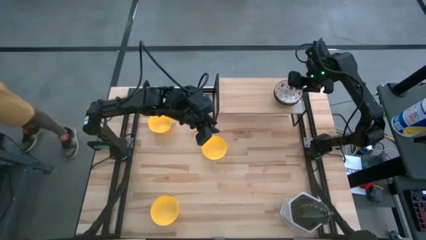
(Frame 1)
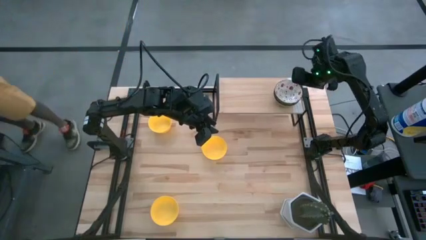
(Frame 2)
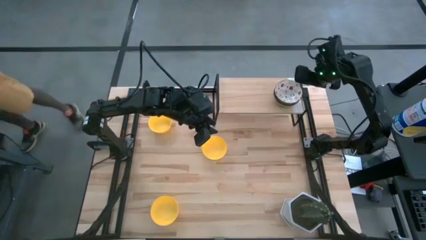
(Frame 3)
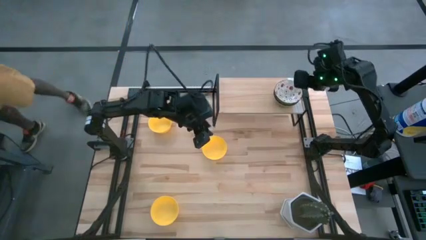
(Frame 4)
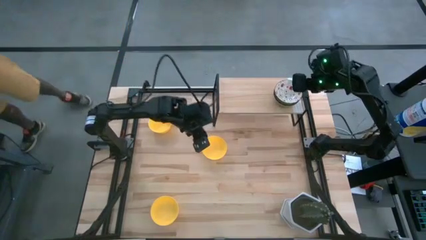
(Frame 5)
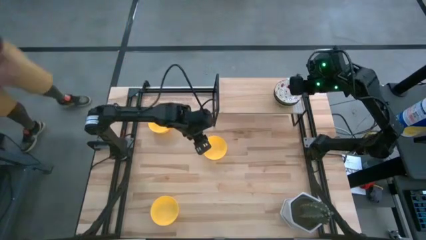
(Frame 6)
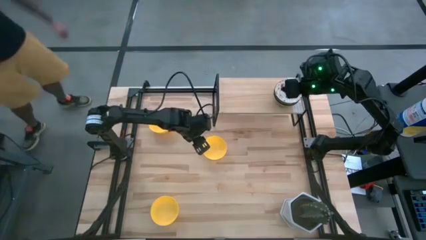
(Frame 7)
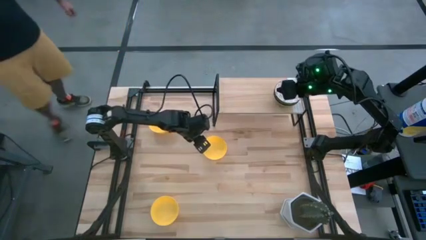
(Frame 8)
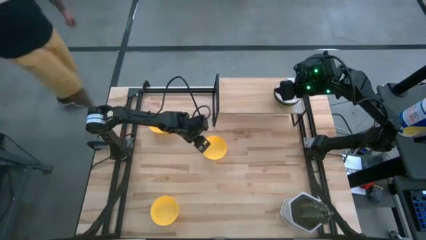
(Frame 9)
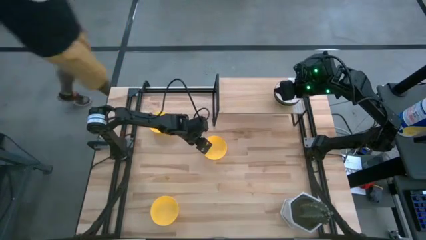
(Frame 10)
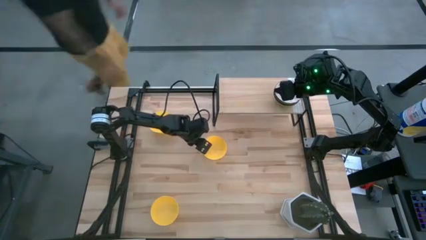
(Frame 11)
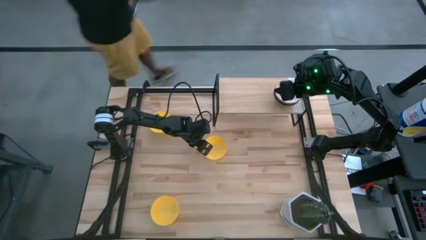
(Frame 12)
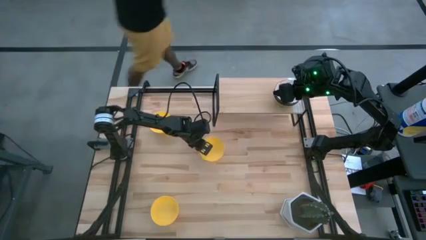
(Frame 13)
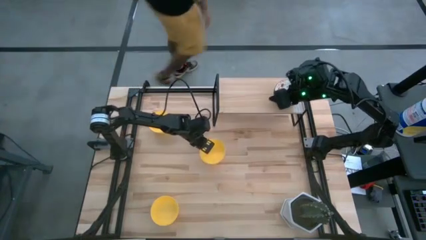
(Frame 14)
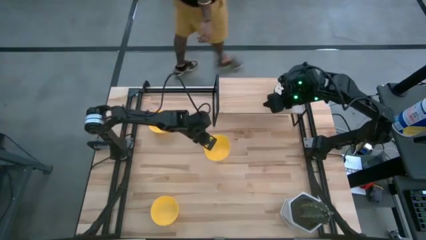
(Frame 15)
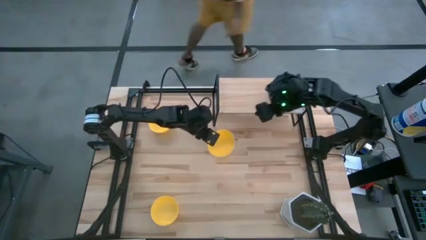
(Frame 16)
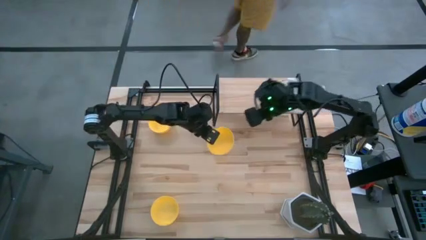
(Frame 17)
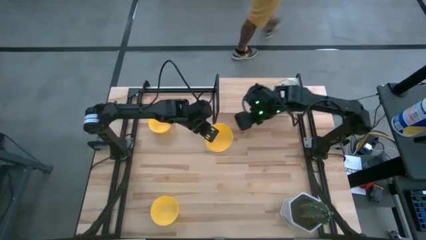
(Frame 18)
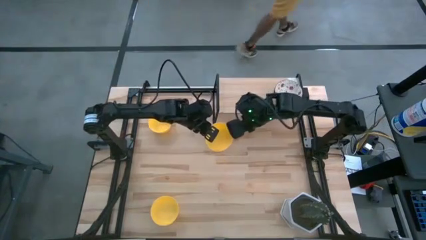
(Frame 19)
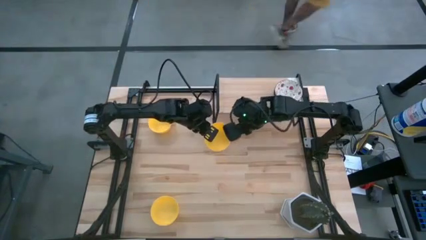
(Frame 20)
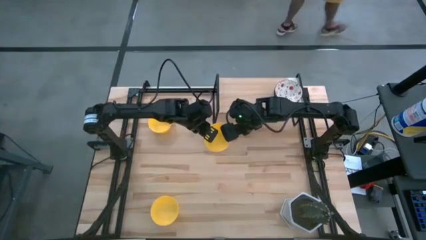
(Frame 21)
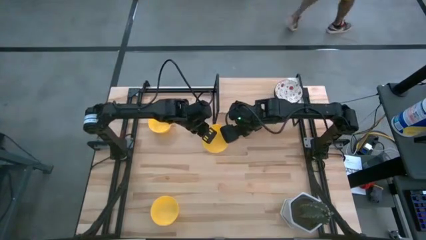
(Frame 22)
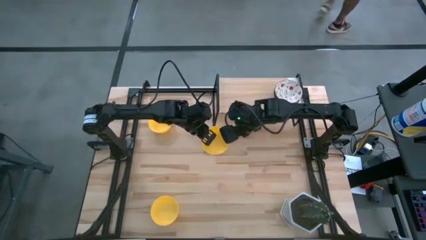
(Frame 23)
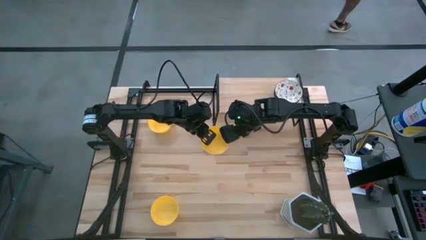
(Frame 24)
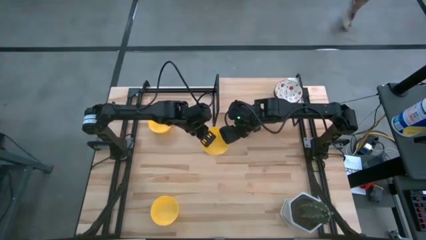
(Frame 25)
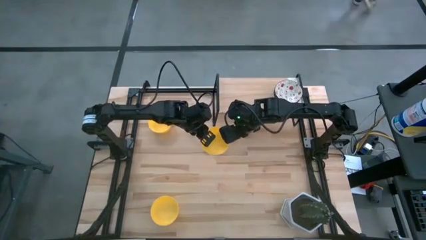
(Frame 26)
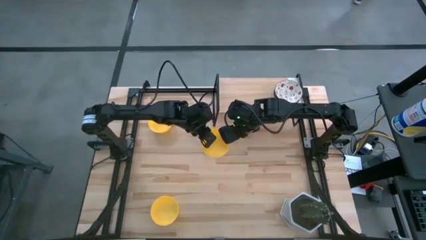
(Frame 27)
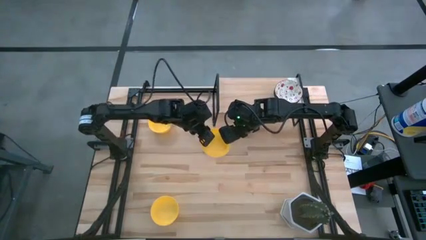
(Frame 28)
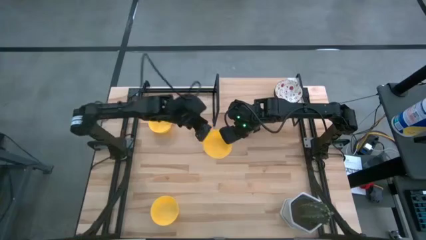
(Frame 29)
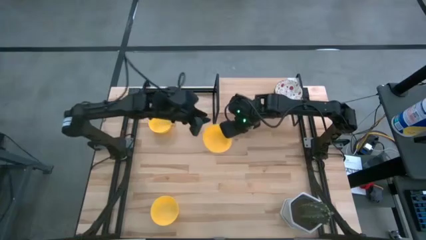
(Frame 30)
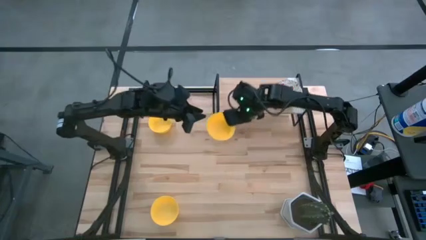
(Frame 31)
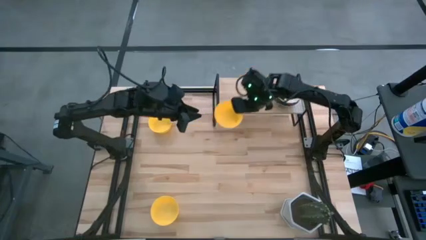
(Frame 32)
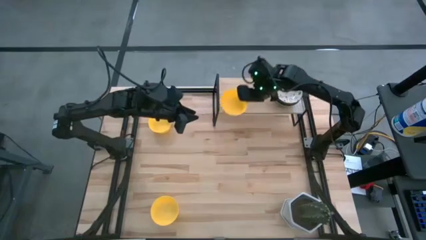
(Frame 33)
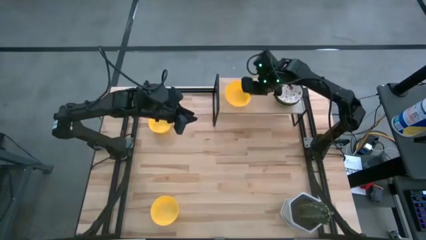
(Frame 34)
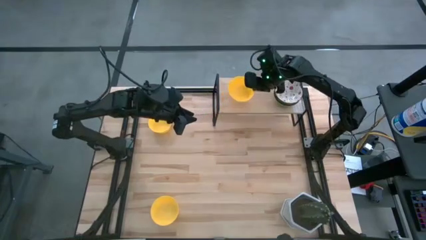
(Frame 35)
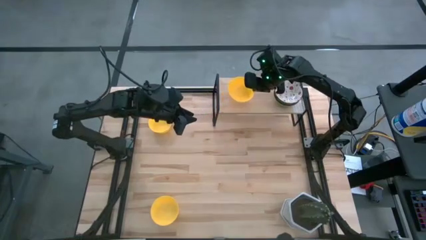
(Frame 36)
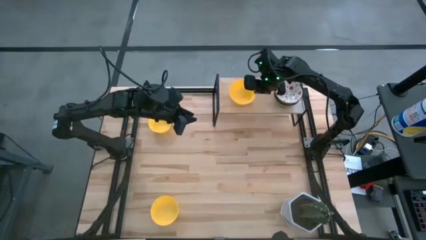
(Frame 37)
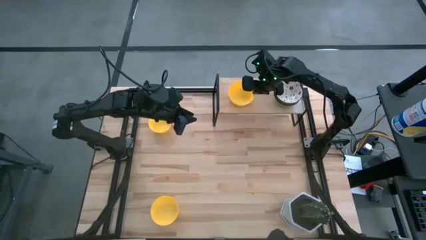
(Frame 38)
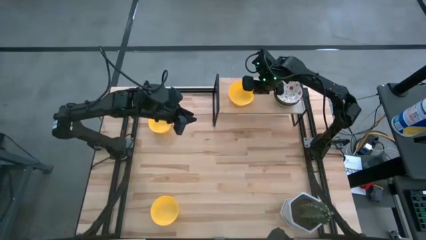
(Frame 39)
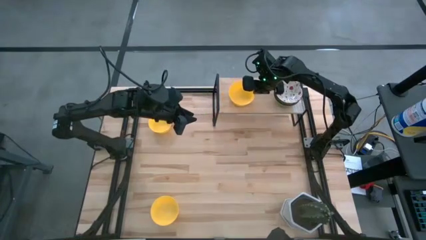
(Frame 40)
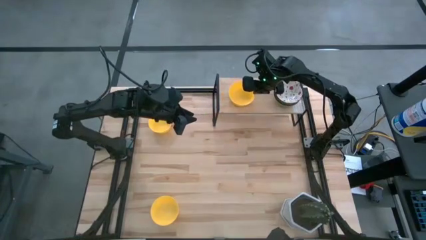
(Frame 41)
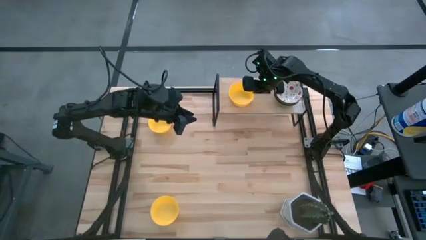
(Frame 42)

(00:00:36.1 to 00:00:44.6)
Task: Pick & Place Mini bowls
Put the right yellow bowl on the shelf

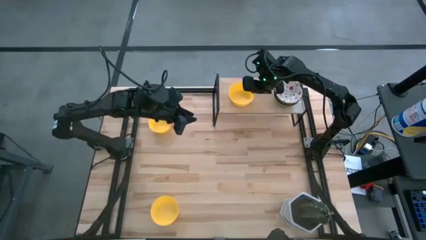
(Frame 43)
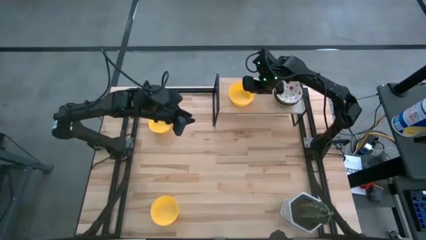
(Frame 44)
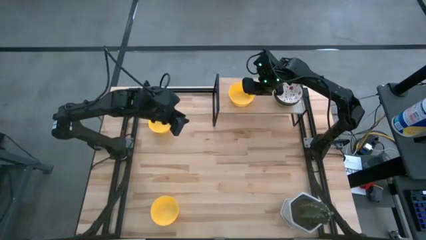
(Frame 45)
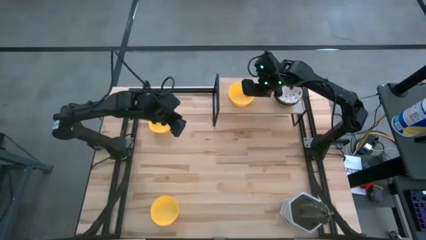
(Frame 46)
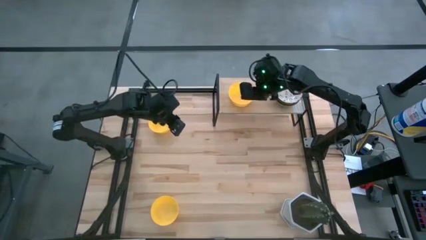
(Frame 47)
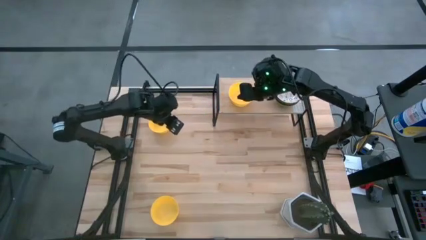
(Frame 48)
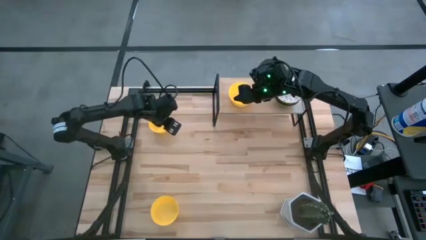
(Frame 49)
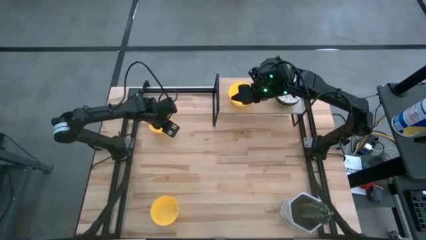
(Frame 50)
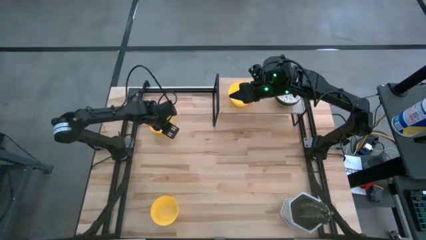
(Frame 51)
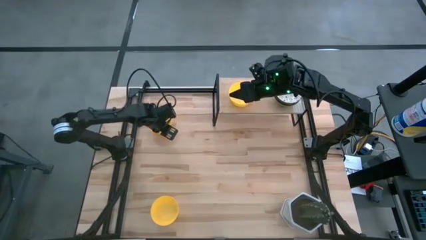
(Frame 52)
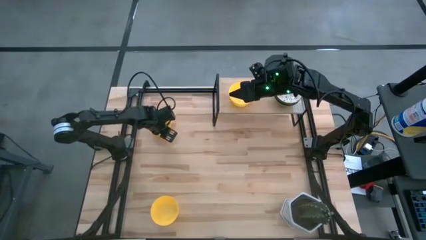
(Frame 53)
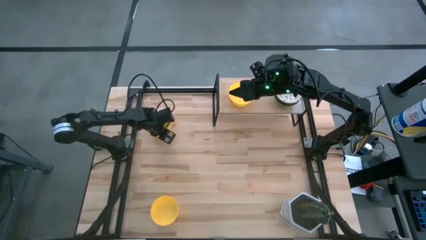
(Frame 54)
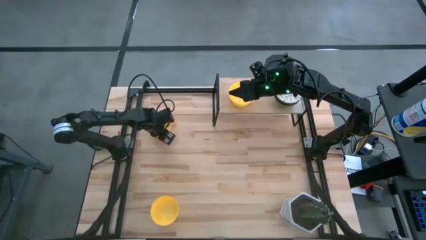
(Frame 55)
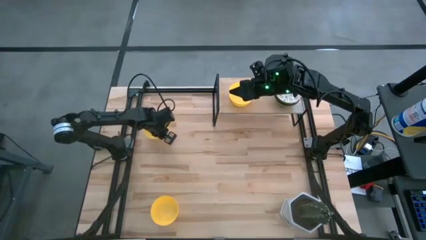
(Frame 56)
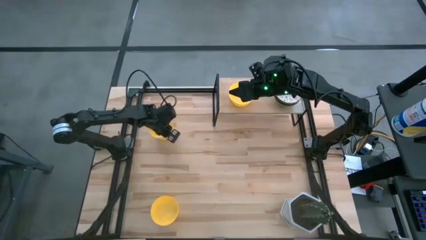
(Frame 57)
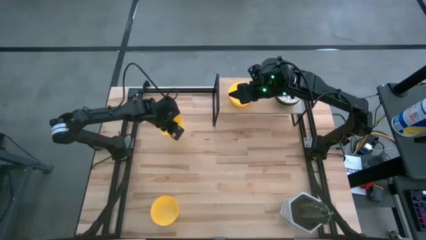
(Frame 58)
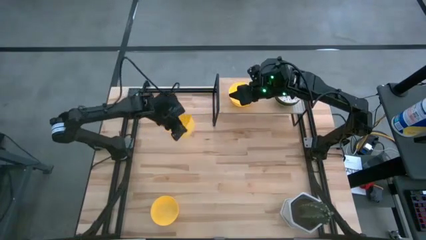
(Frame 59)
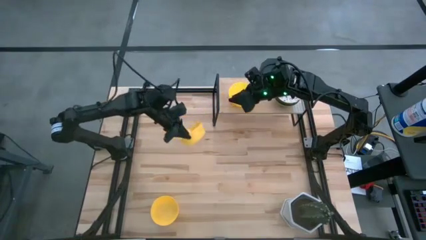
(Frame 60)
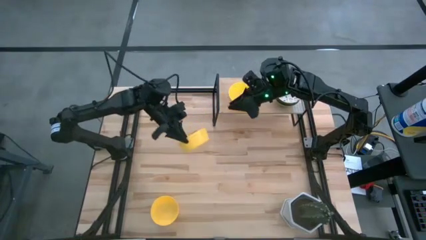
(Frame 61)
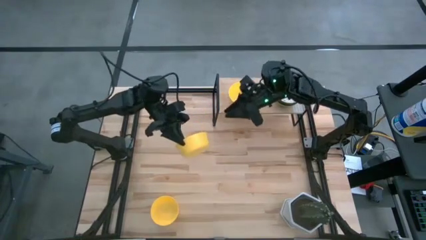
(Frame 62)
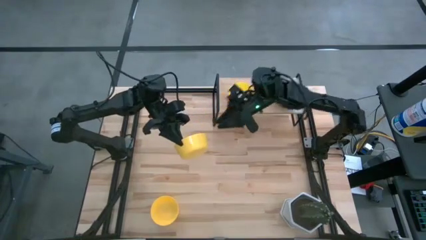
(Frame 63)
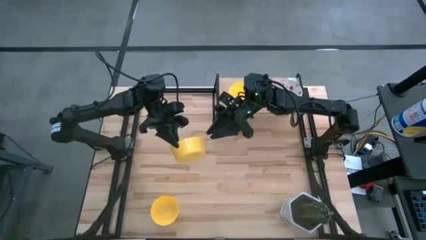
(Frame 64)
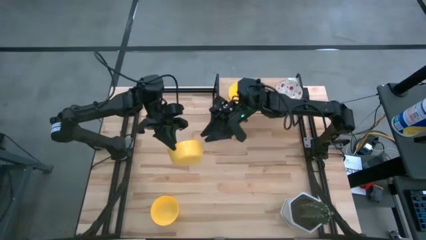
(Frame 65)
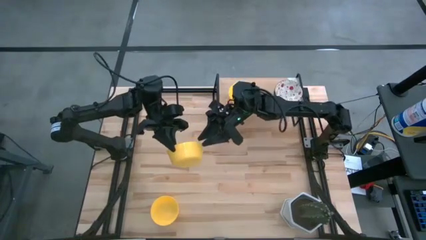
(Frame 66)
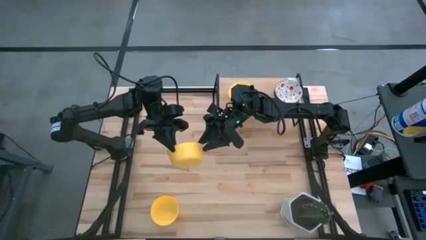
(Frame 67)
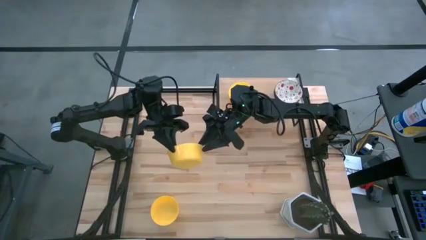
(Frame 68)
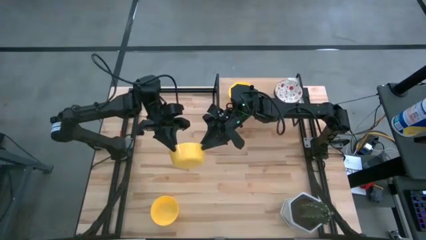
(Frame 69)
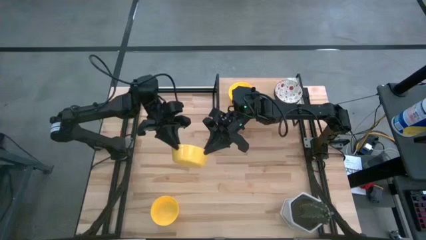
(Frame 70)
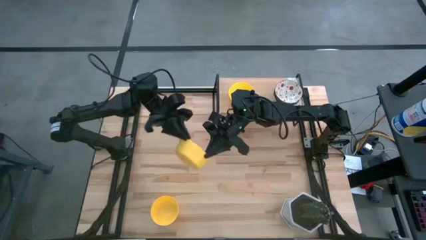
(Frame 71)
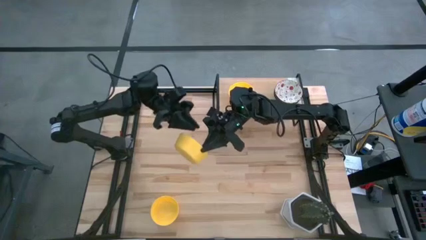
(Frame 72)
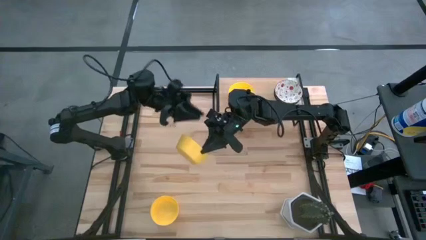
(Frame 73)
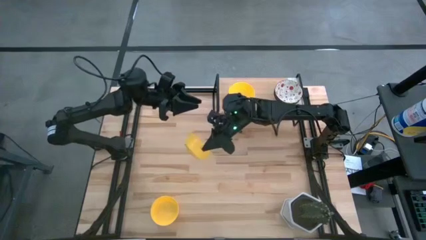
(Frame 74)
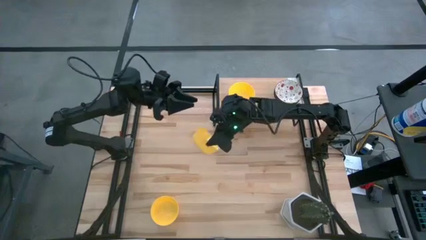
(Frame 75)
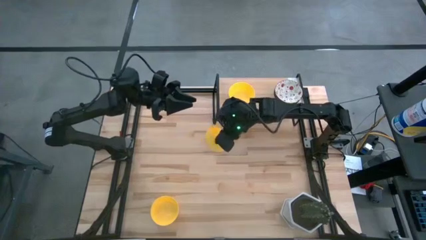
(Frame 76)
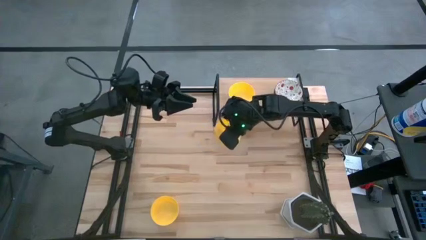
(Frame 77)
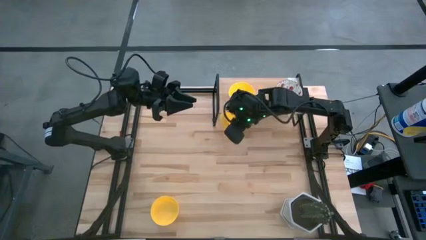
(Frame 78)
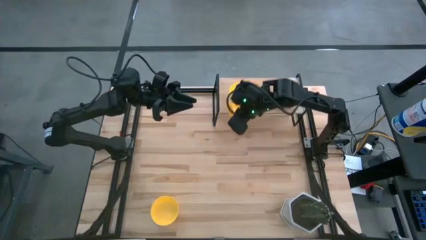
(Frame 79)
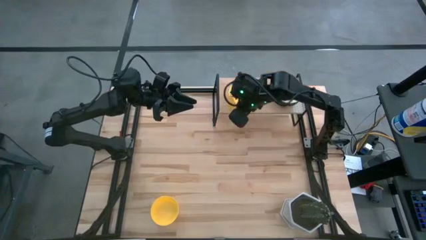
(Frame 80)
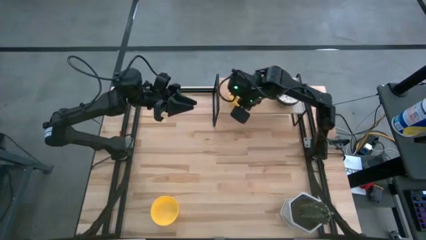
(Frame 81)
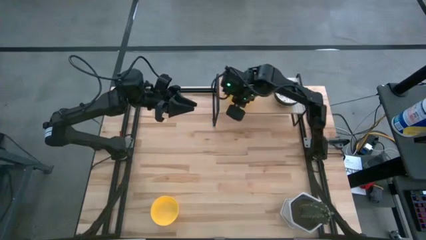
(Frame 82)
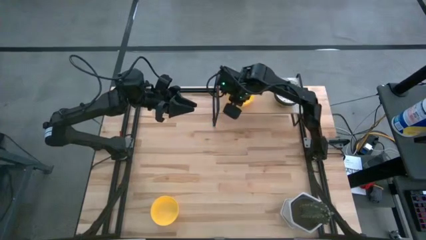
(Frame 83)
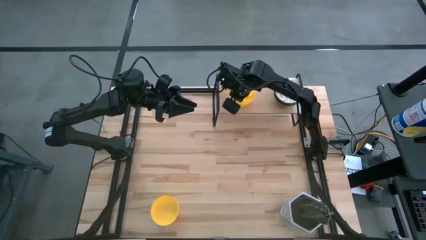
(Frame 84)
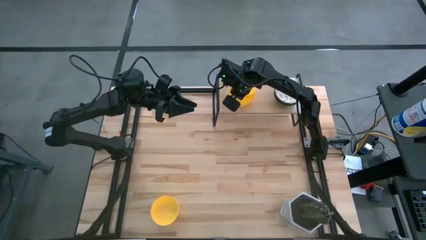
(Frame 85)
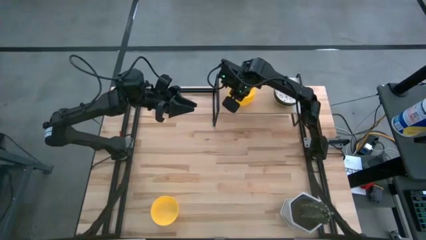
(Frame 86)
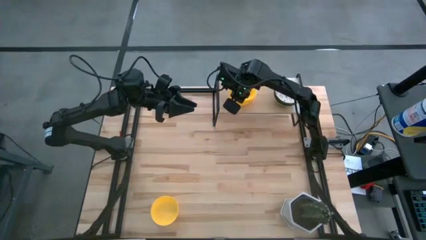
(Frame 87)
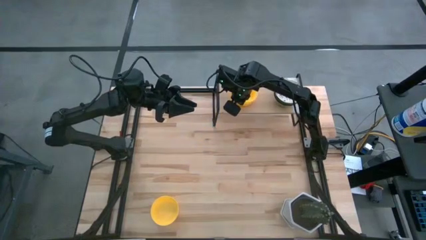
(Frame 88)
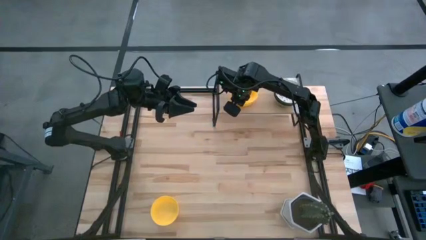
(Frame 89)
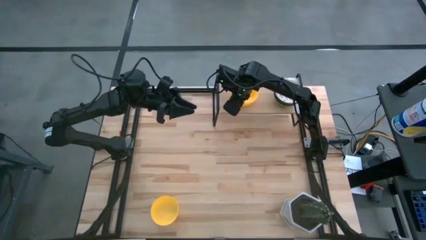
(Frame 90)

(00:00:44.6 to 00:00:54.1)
Stack the top yellow bowl on the yellow bowl on the shelf
